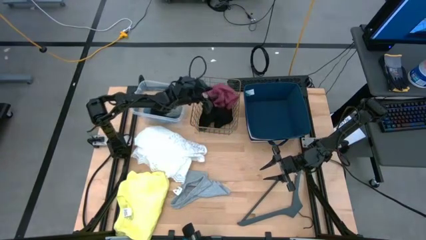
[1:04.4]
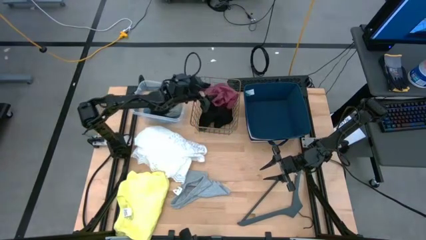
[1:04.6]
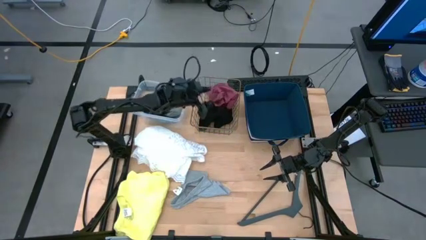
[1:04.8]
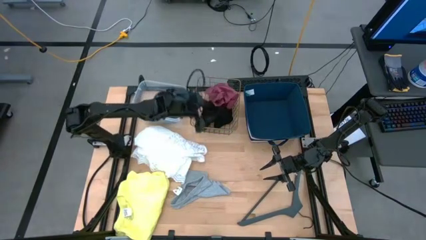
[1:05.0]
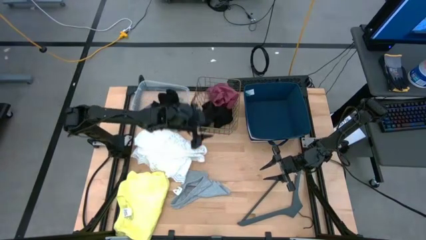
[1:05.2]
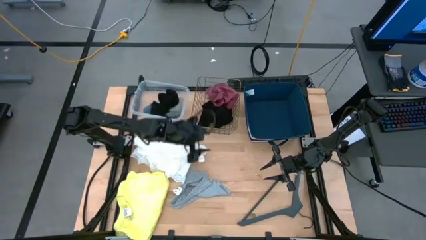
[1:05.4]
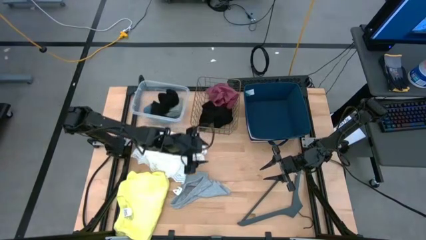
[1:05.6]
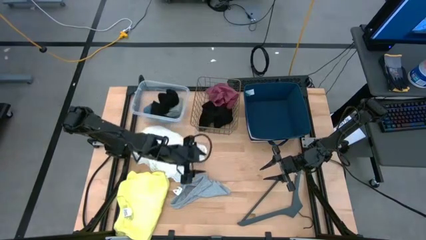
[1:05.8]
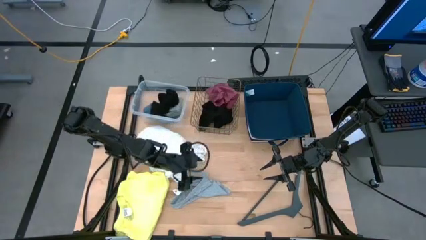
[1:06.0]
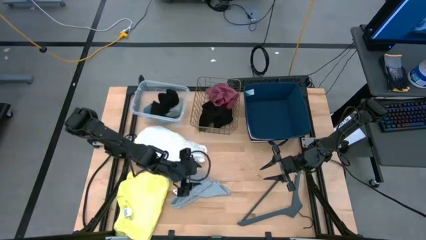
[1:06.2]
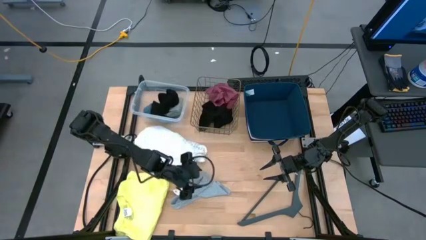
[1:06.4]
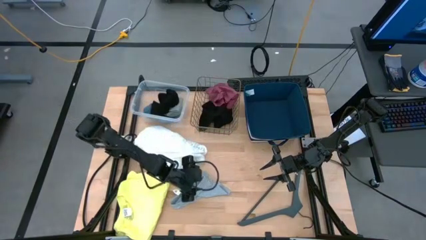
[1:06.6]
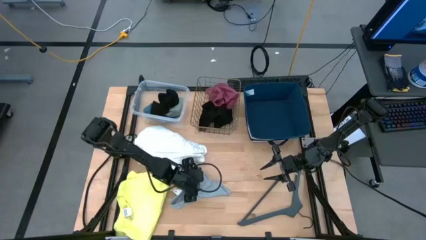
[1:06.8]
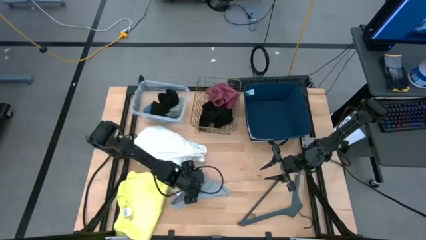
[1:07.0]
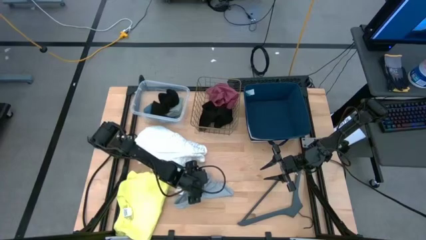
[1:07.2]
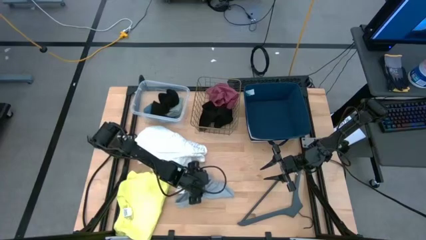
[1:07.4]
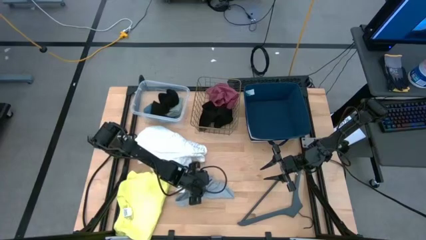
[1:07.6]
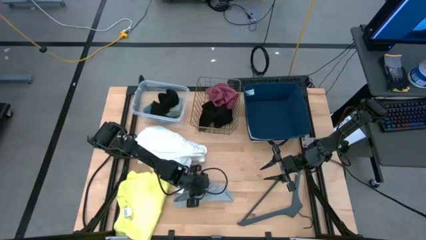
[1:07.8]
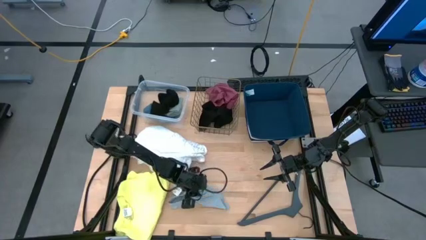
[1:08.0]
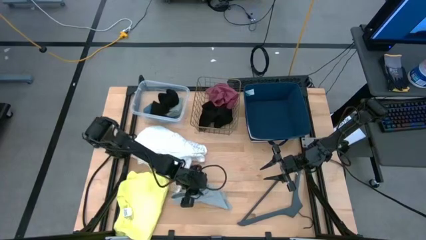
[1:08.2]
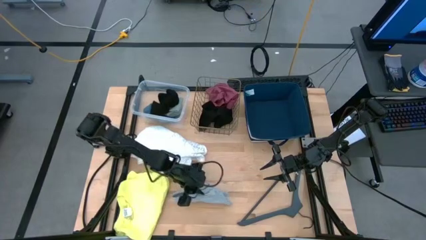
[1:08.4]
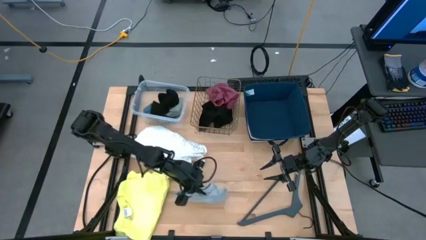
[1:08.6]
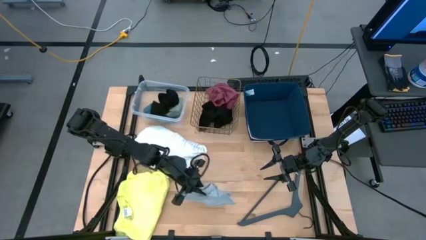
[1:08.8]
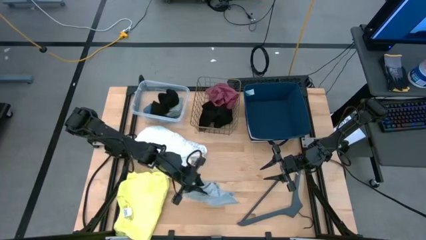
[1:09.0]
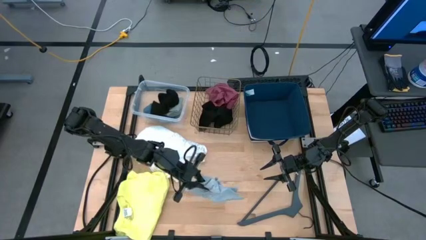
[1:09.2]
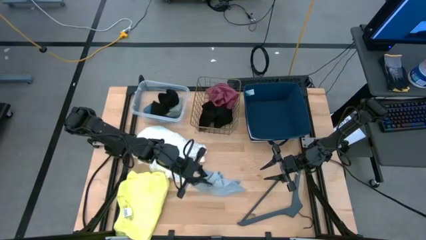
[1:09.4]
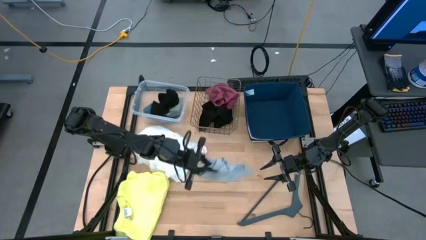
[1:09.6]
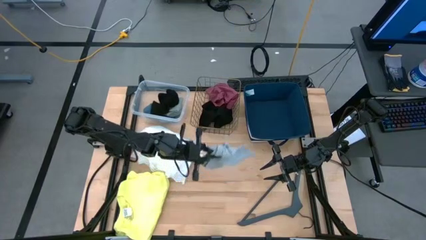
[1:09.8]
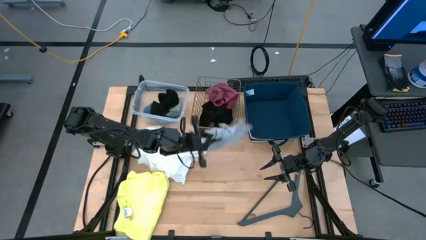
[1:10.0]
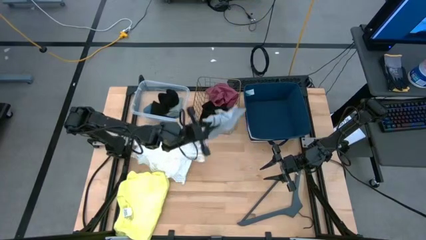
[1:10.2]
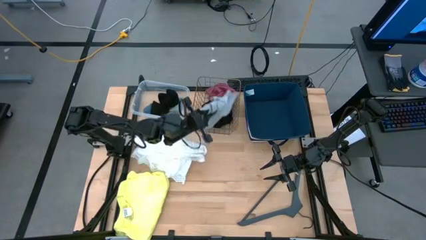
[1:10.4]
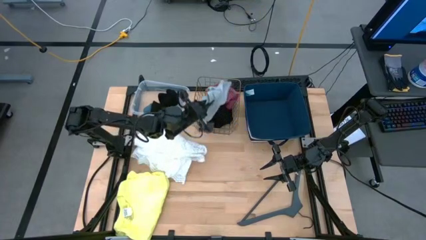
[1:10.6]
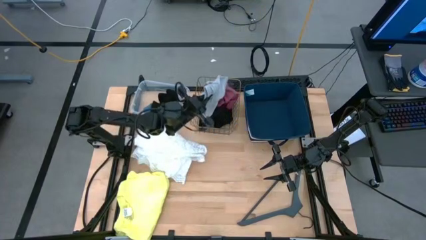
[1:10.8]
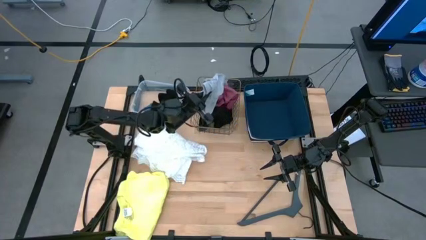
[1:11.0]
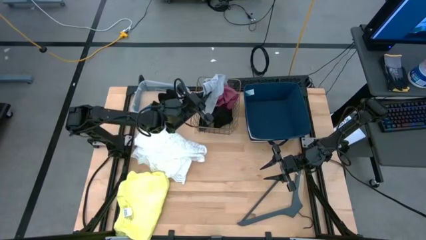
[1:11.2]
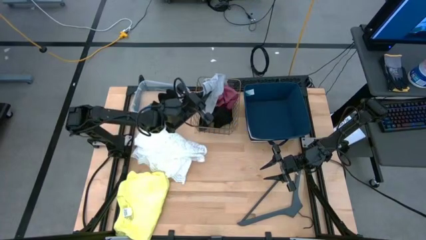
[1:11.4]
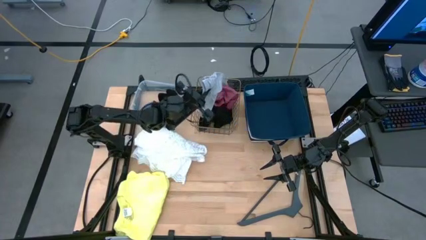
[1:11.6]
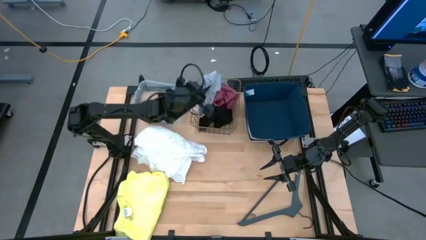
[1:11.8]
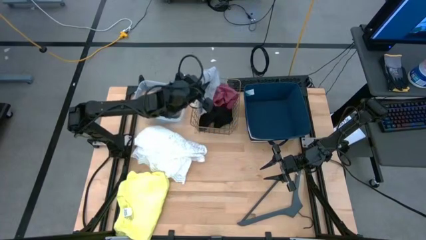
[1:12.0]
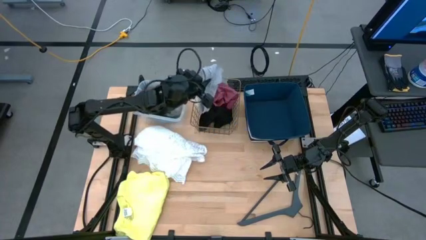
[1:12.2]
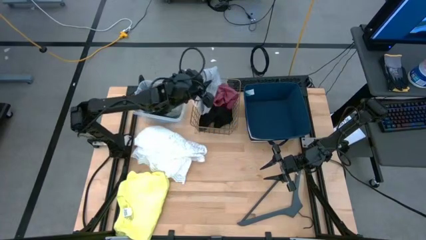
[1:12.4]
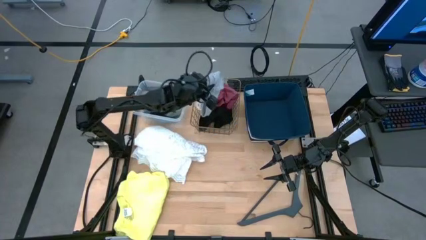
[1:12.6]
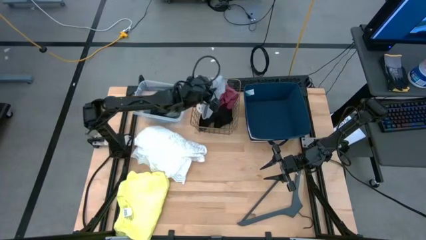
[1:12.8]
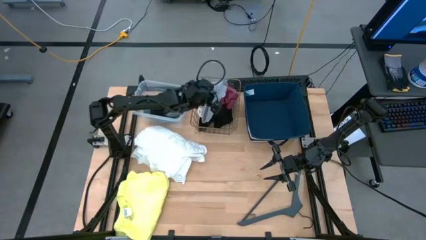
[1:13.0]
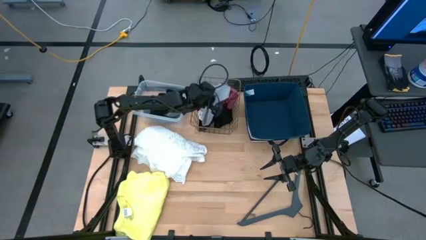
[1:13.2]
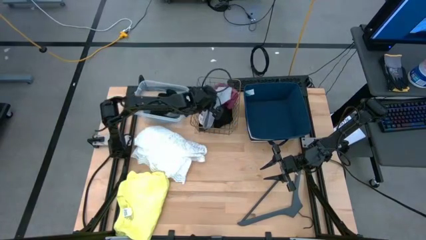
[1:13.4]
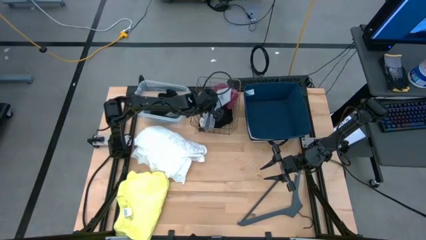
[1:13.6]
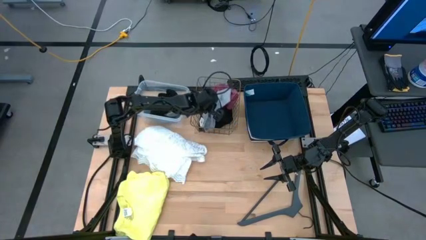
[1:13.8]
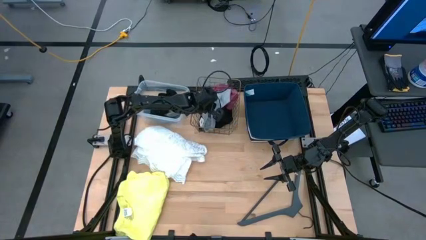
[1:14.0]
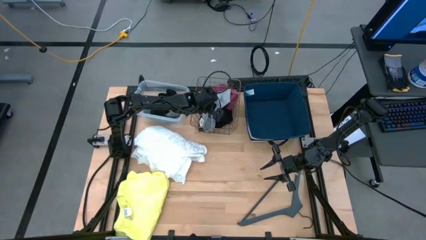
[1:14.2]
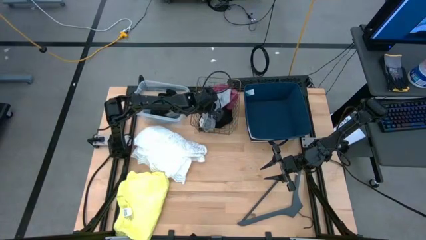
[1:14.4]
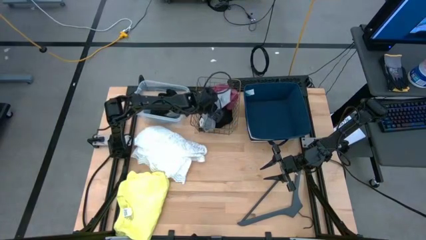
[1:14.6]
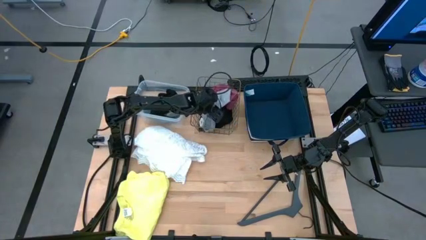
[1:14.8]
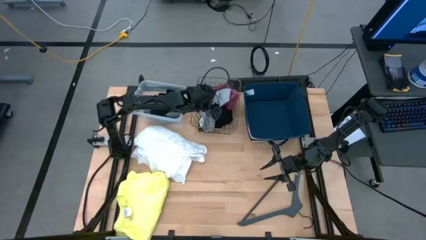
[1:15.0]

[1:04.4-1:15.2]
Task: Pick & Place Cloths
Put the gray underwear into the wire basket
